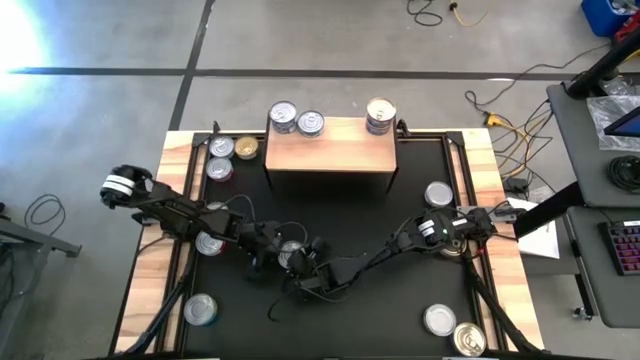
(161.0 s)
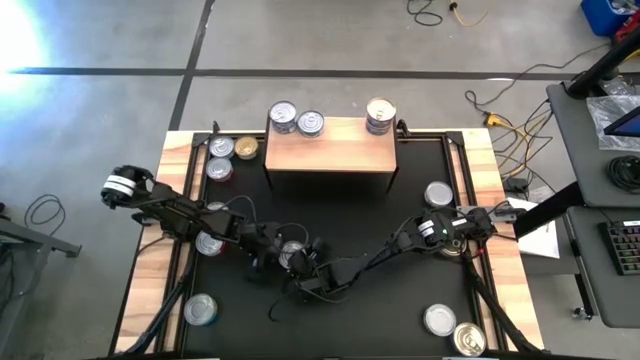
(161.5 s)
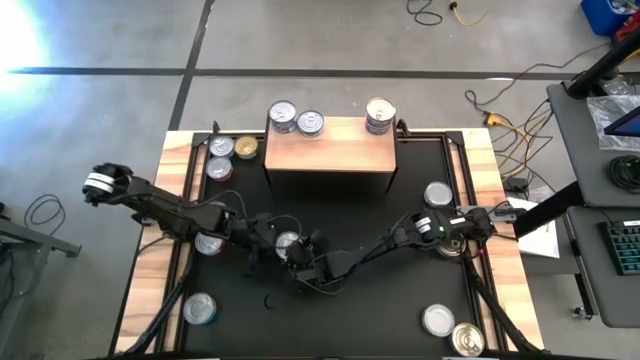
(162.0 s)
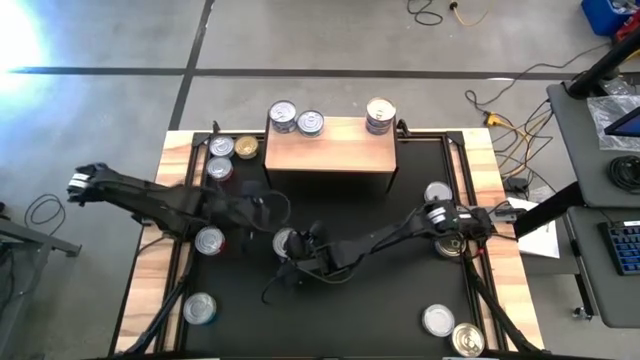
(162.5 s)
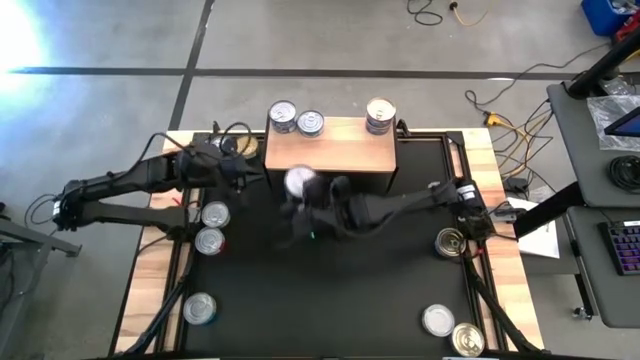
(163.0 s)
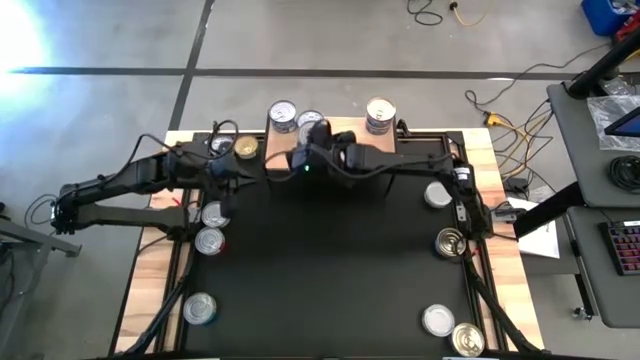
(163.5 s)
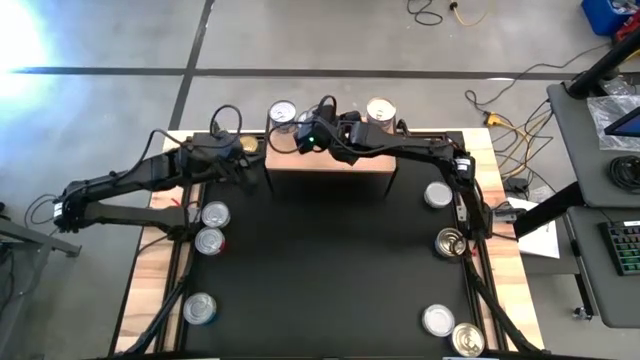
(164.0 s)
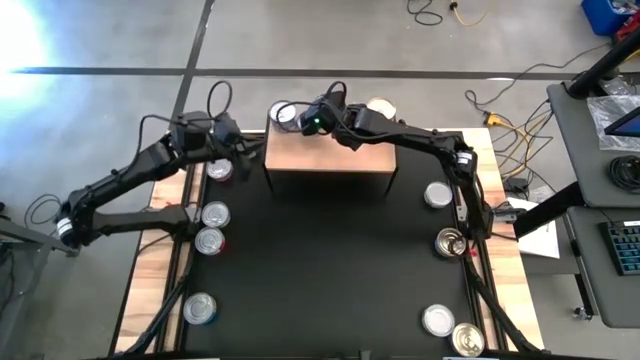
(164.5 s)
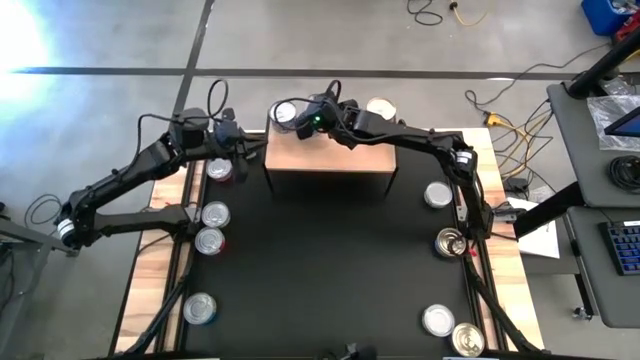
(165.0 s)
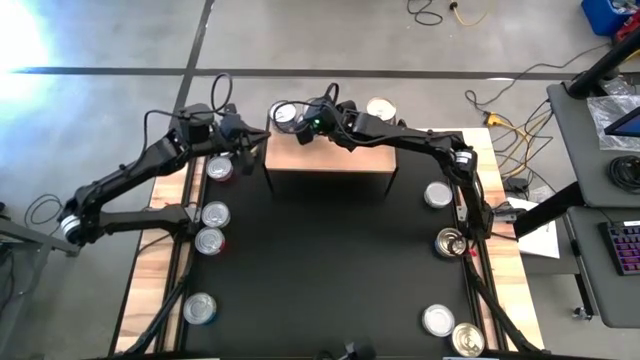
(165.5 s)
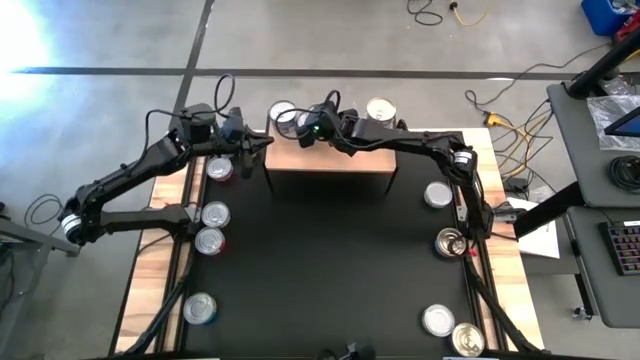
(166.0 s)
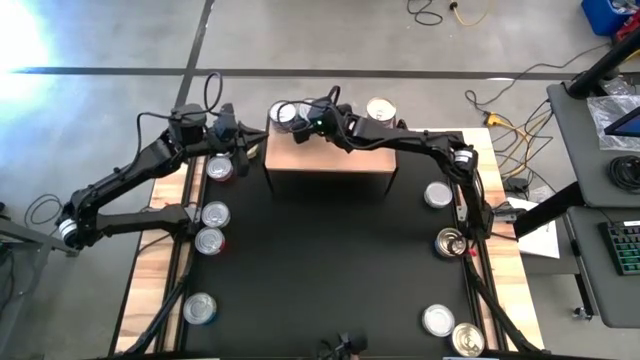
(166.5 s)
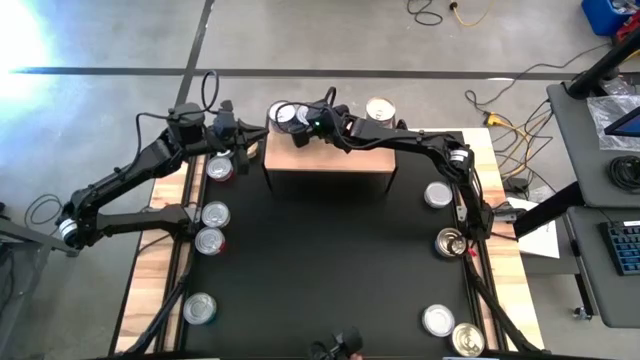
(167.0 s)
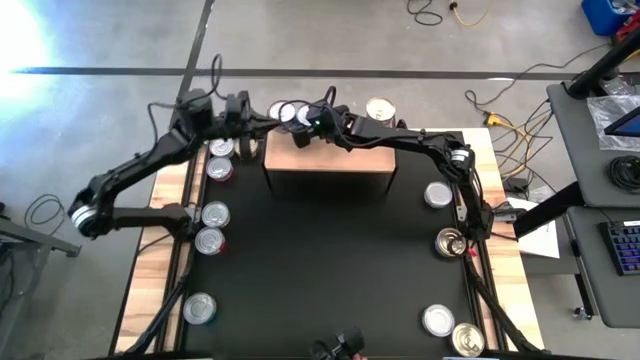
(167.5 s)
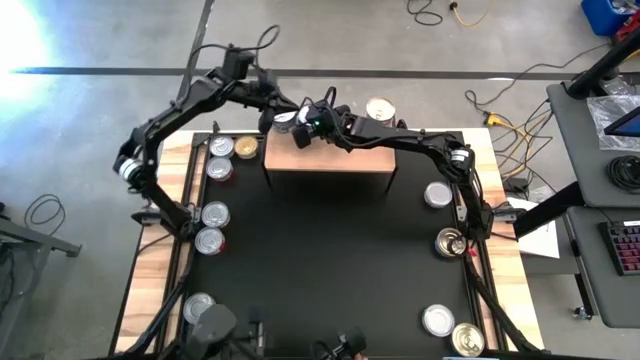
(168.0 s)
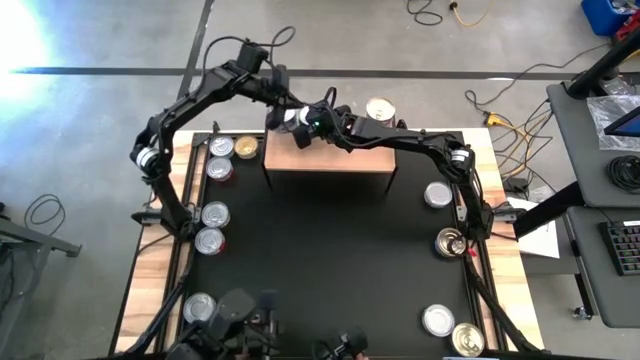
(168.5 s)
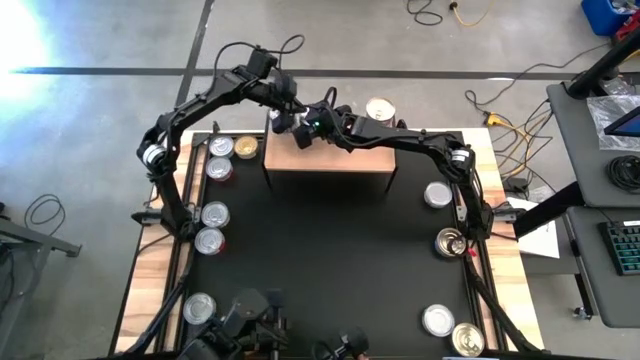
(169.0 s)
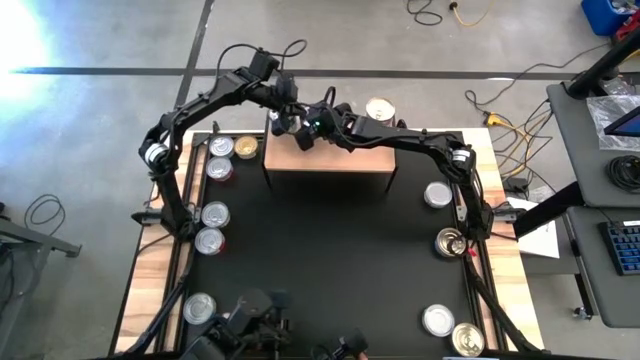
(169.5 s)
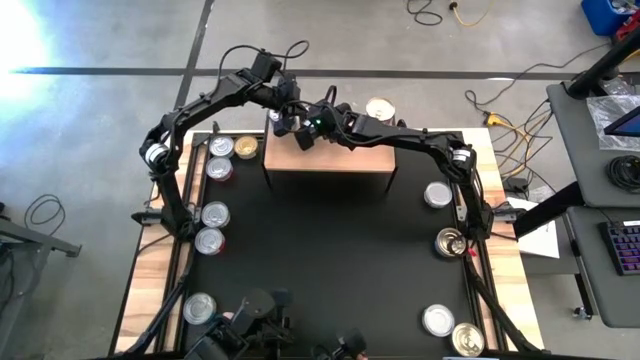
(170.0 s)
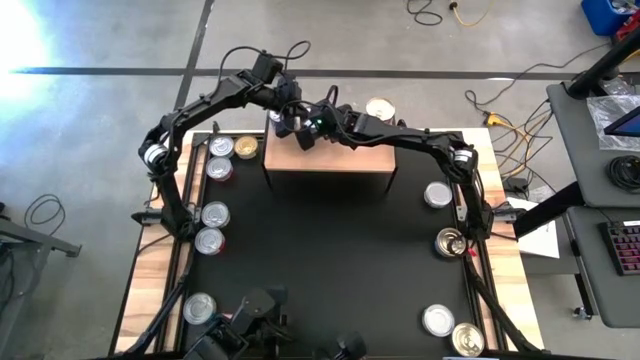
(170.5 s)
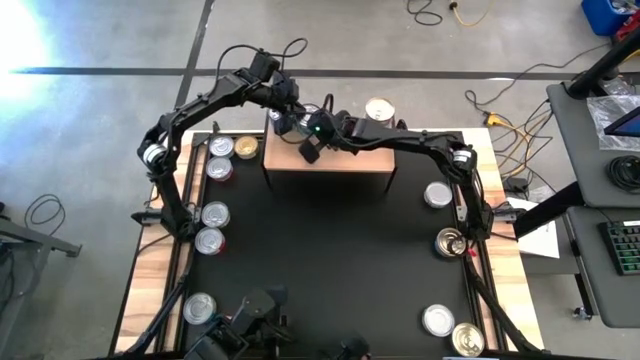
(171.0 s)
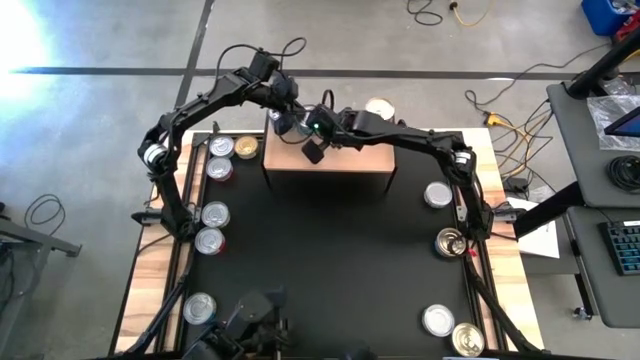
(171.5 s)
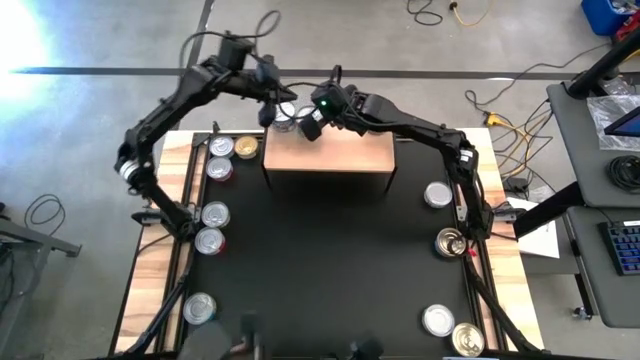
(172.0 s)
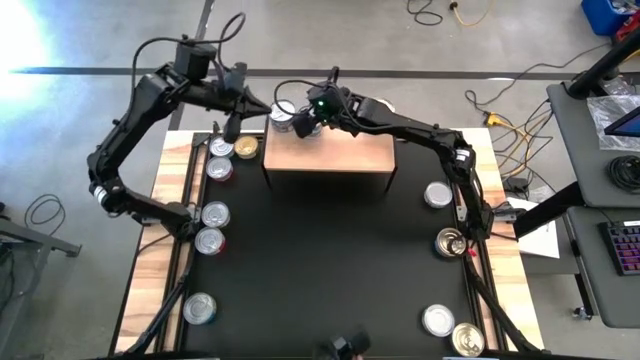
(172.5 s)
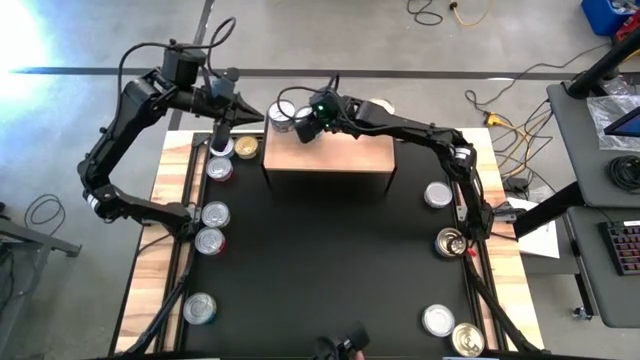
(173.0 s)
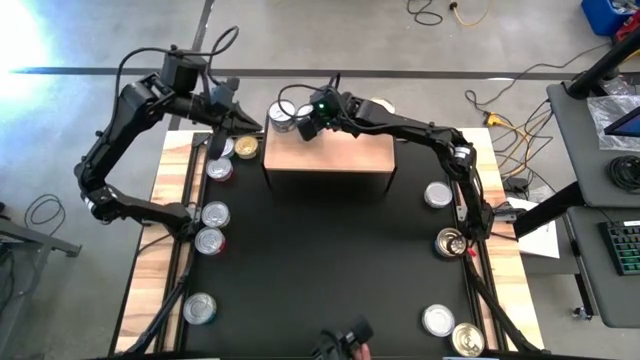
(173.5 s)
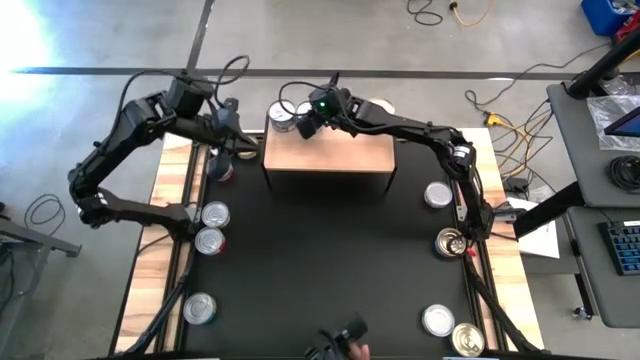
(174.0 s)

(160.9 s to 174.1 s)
Task: Stack canned seafood by type on shelf
Stack the green-blue tuna can on the shelf

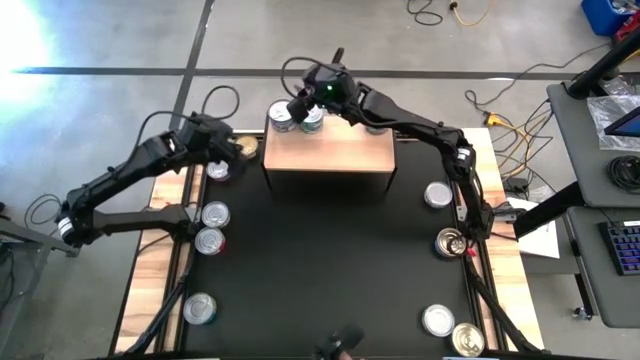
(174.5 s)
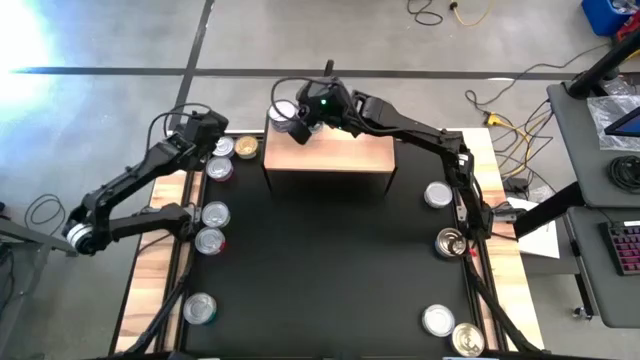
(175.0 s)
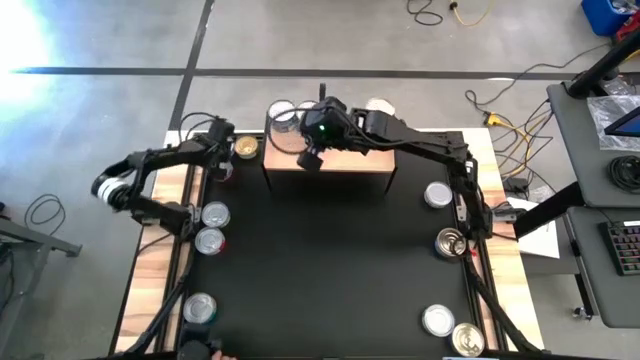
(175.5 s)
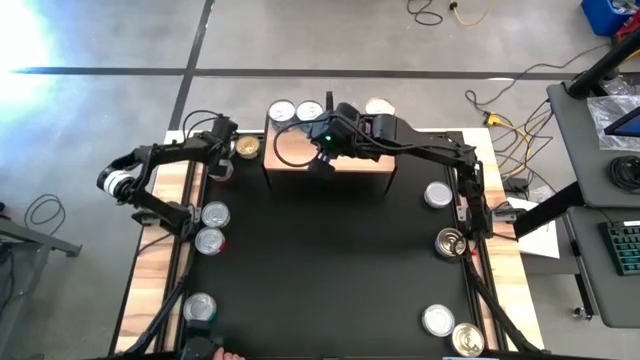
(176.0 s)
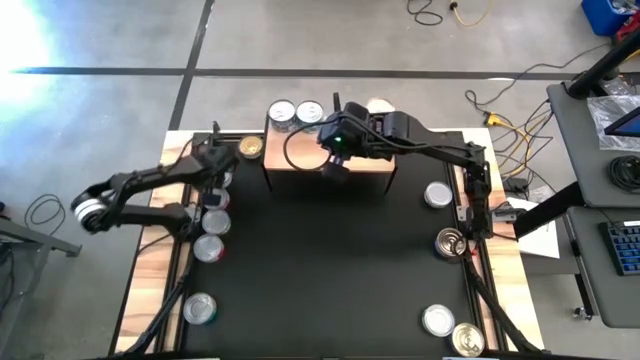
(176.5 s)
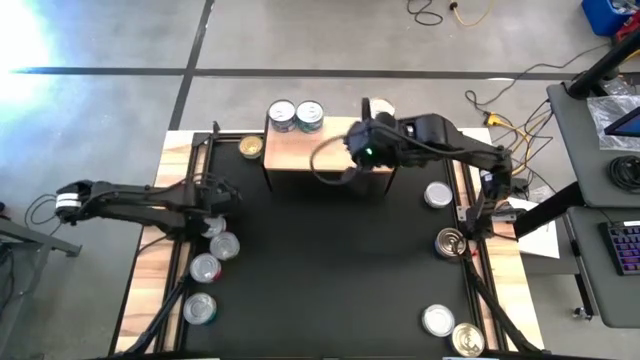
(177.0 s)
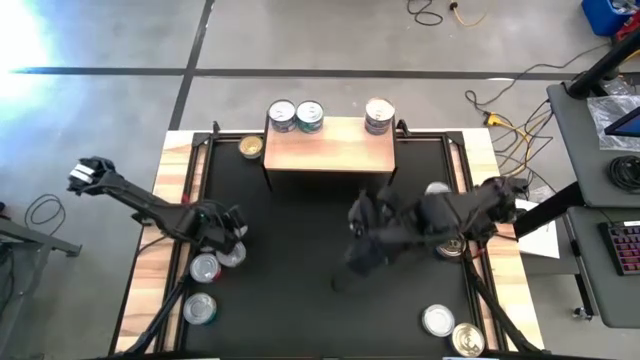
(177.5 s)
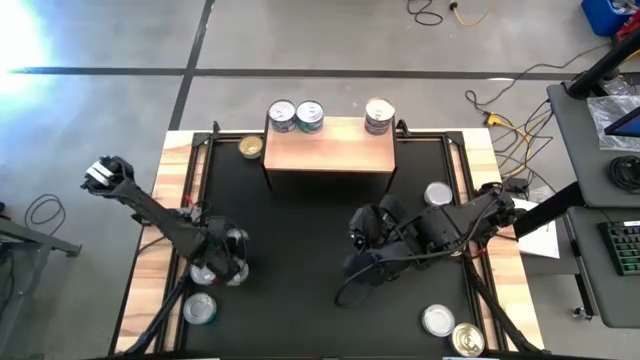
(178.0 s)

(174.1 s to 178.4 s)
Move the tuna cans to the middle left of the table

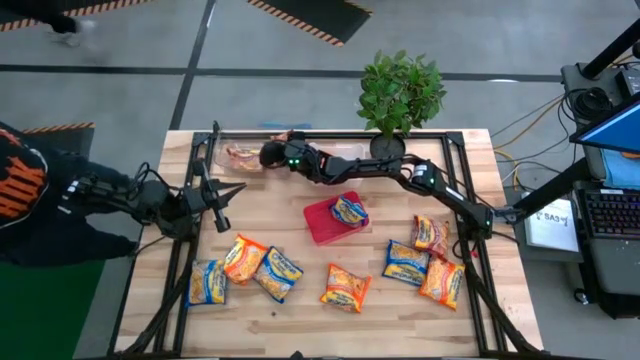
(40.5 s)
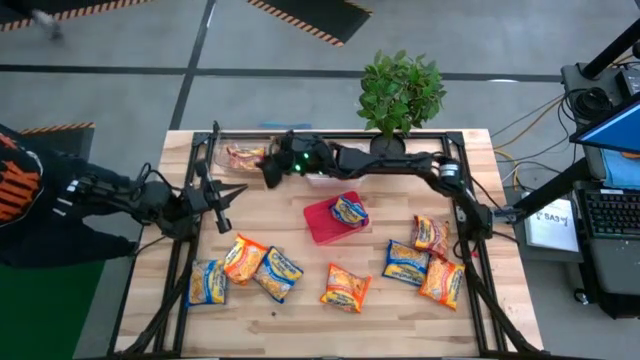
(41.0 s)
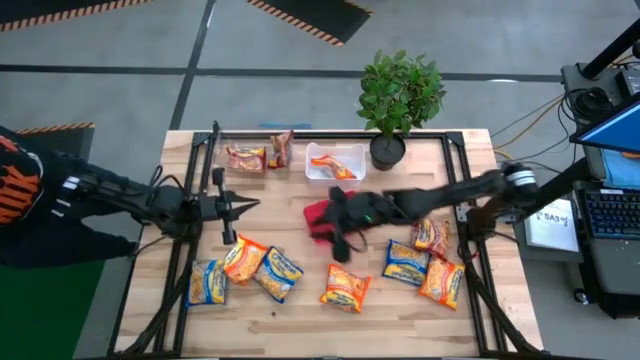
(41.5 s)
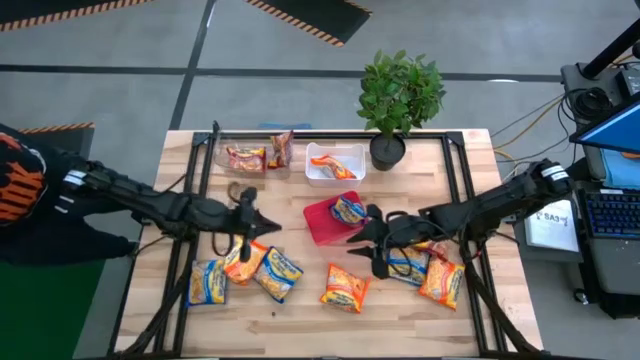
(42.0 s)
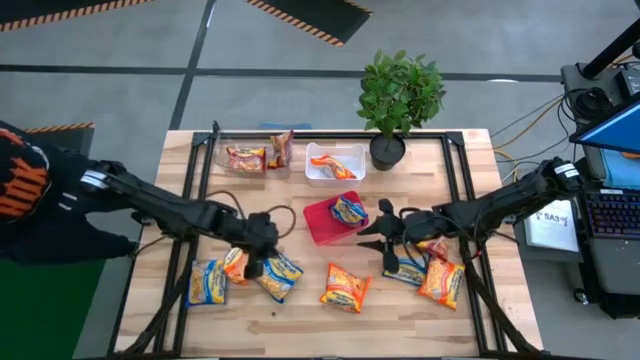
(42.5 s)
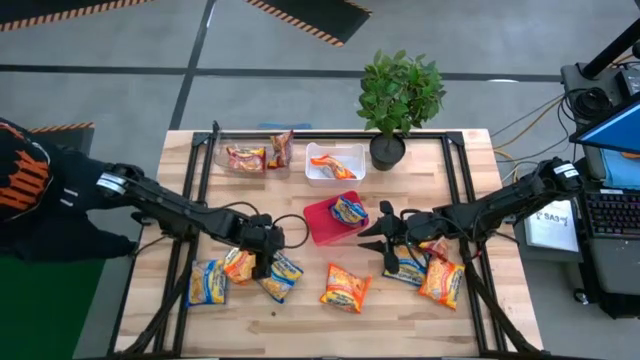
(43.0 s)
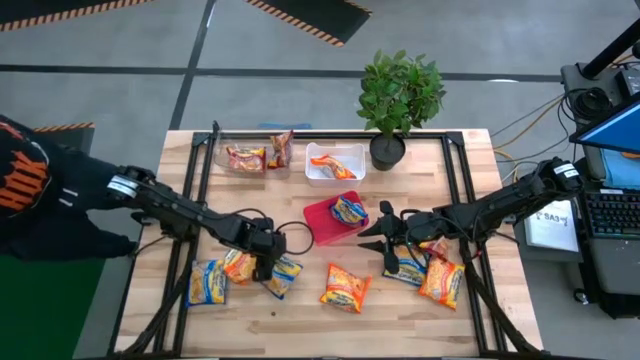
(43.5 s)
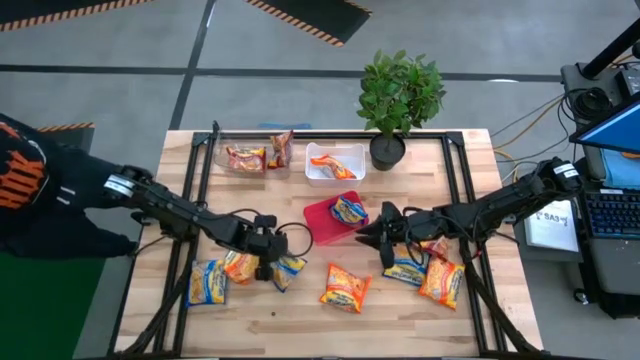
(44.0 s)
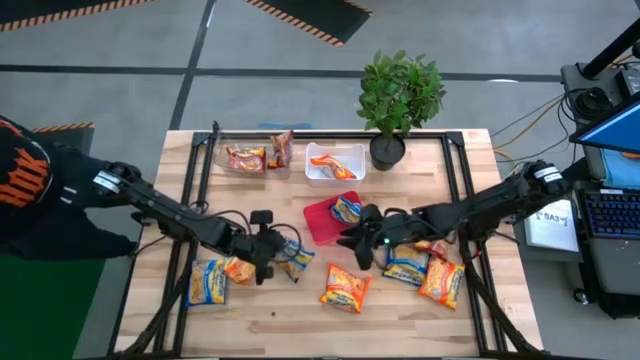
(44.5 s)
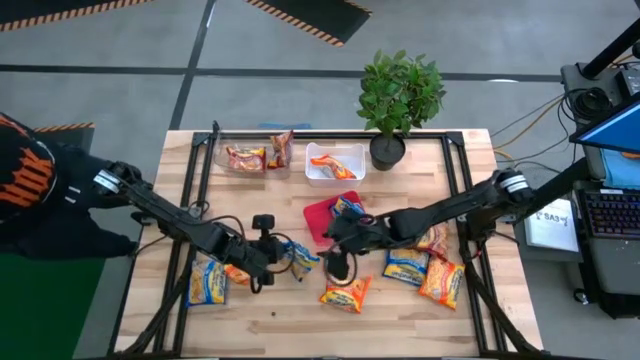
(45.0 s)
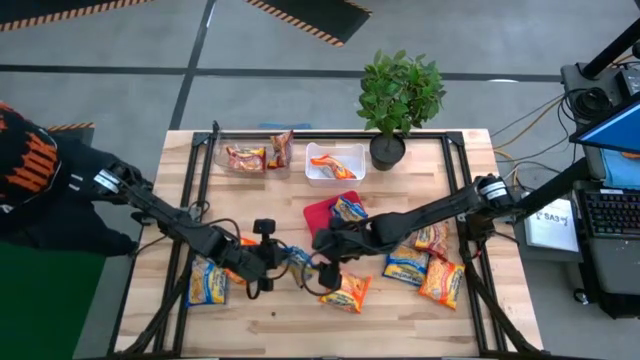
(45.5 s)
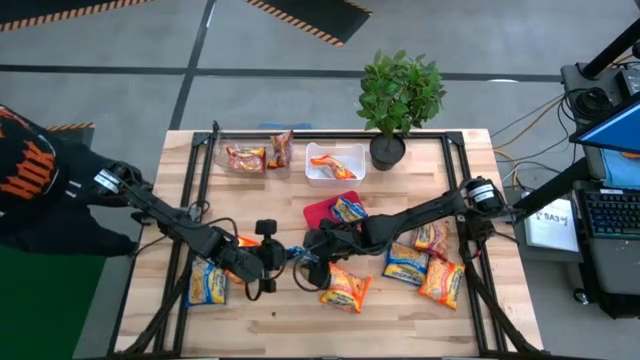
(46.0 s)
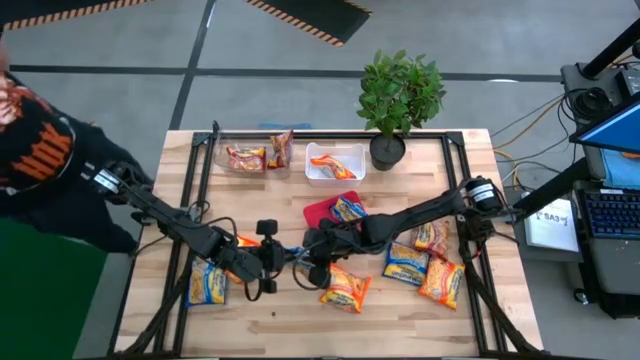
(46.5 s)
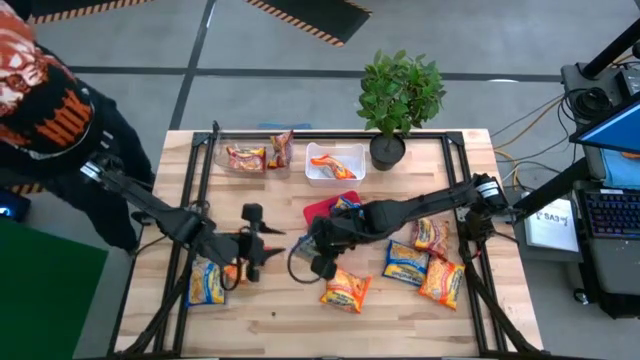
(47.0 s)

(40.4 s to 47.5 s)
Task: Sort Maruchan noodles
Put the blue noodle pack into the red bin
